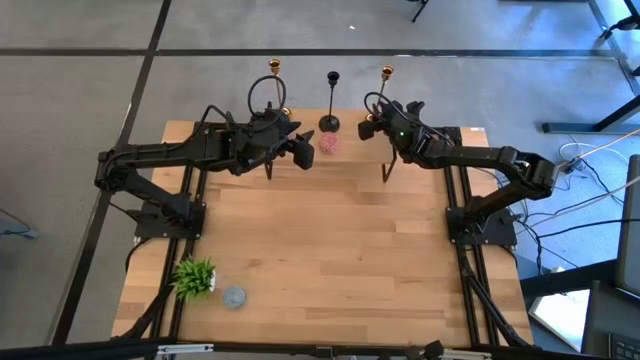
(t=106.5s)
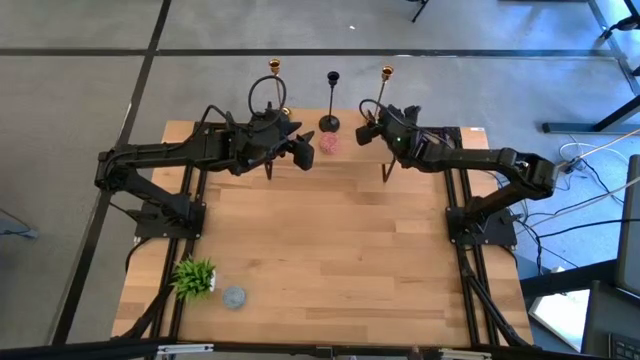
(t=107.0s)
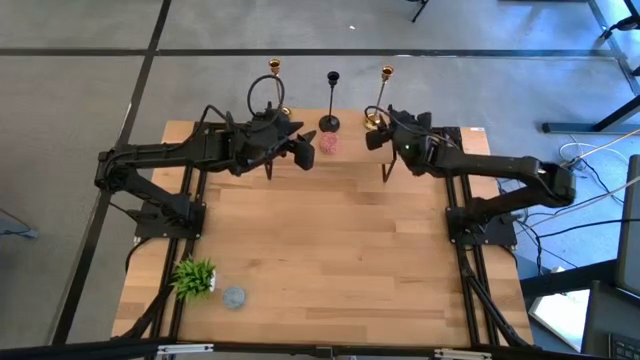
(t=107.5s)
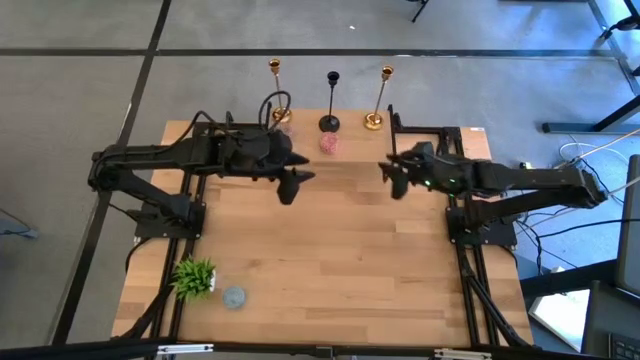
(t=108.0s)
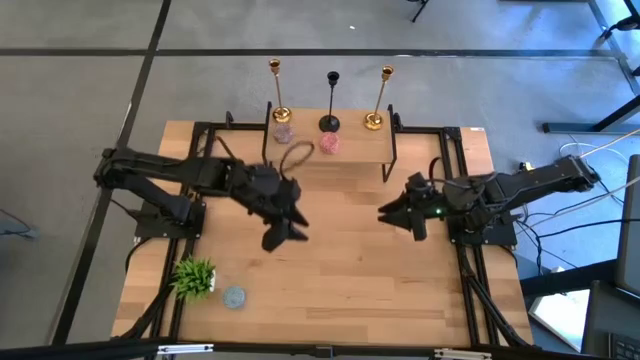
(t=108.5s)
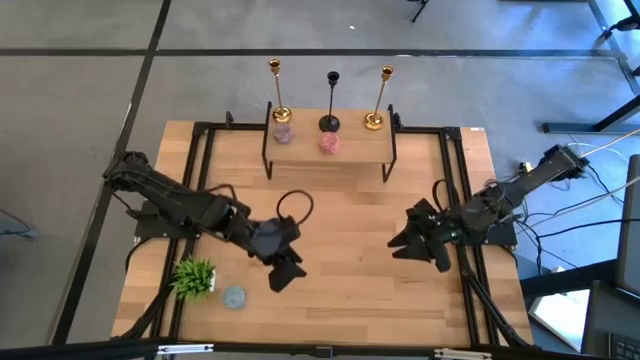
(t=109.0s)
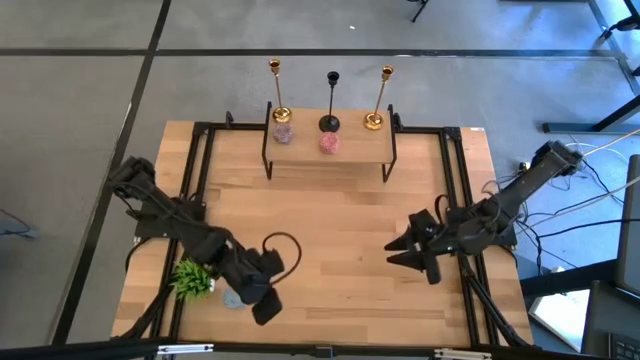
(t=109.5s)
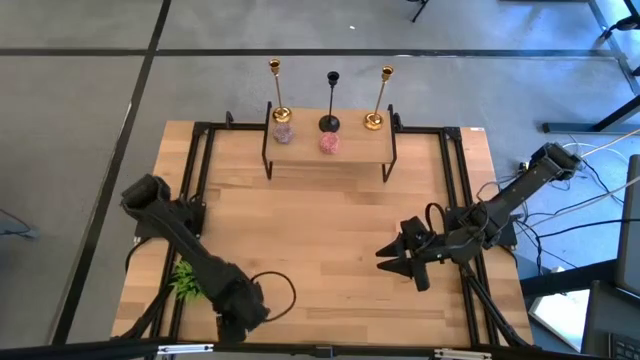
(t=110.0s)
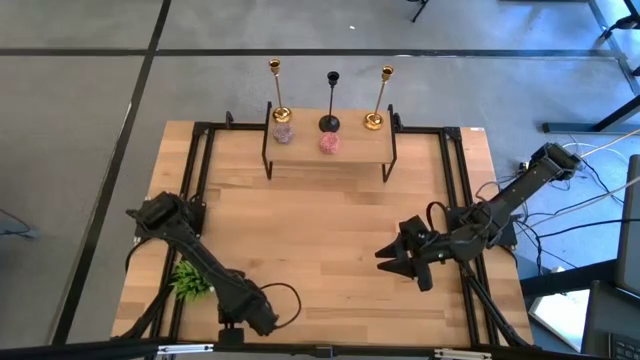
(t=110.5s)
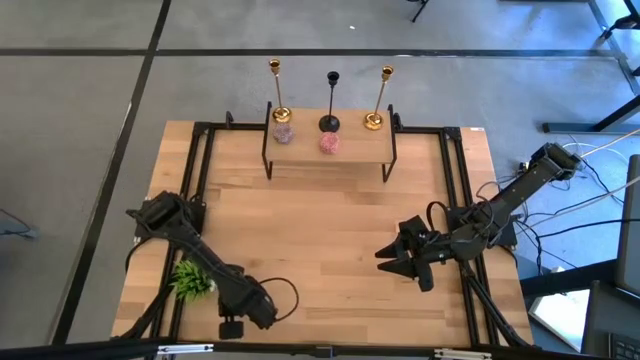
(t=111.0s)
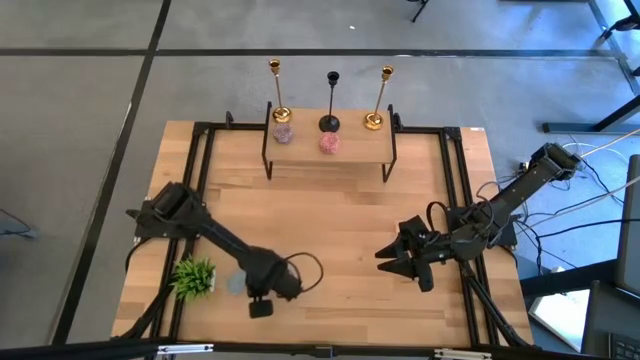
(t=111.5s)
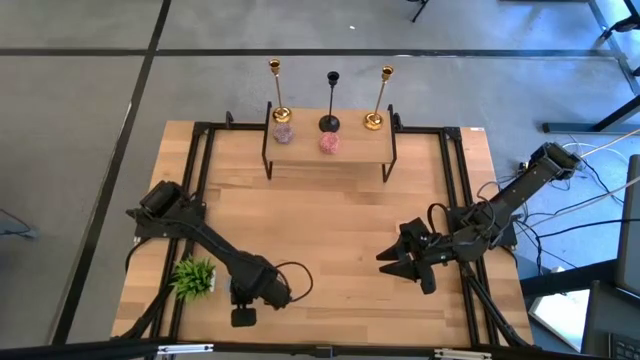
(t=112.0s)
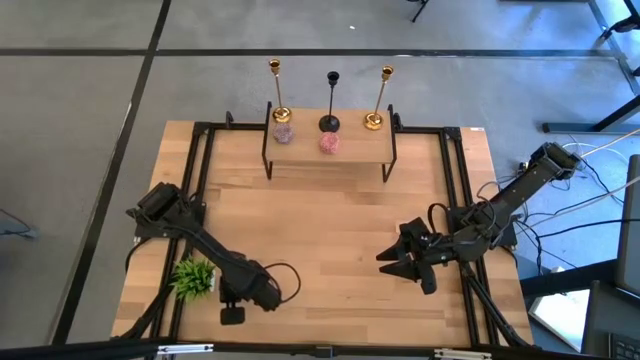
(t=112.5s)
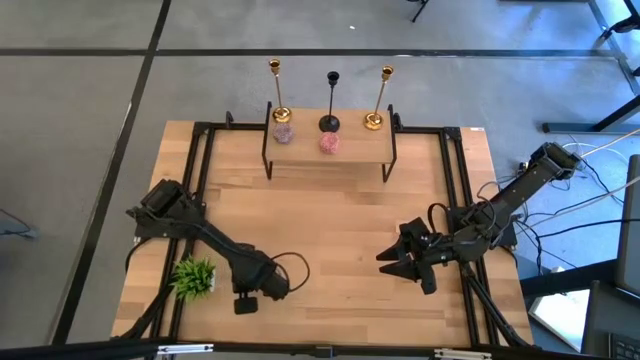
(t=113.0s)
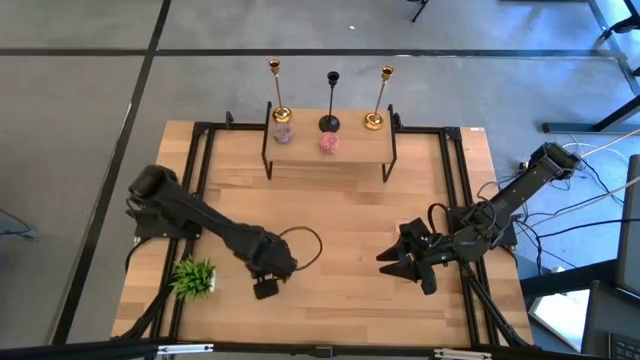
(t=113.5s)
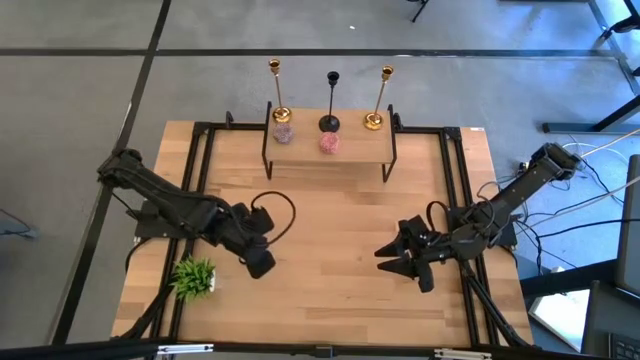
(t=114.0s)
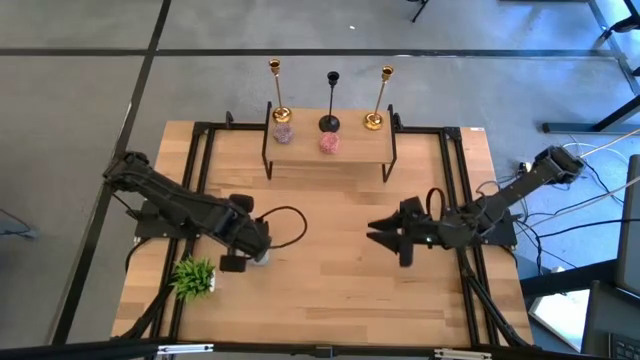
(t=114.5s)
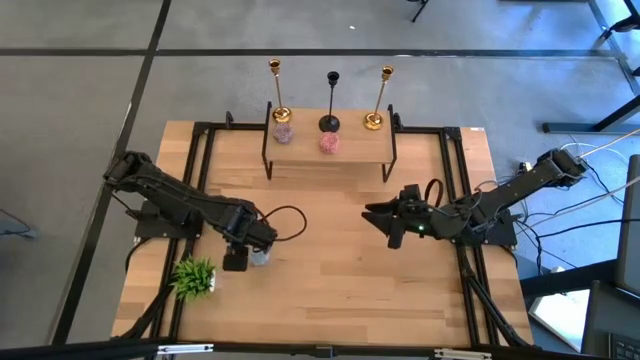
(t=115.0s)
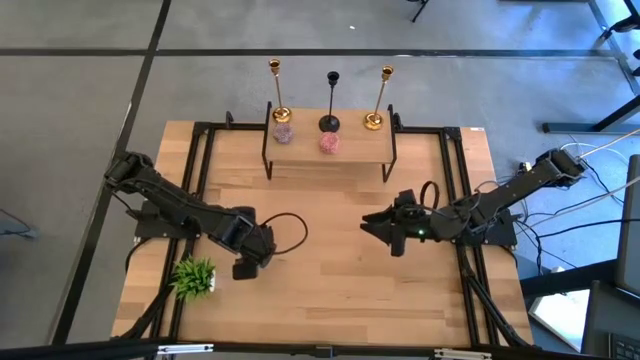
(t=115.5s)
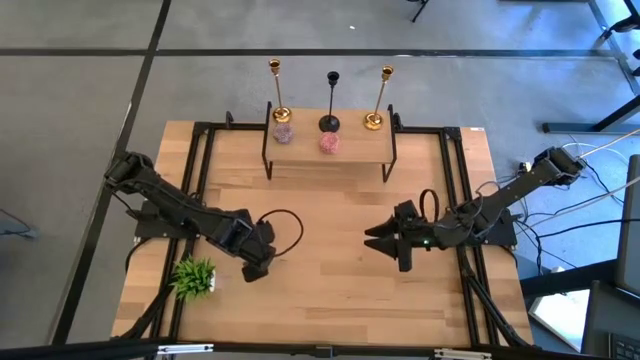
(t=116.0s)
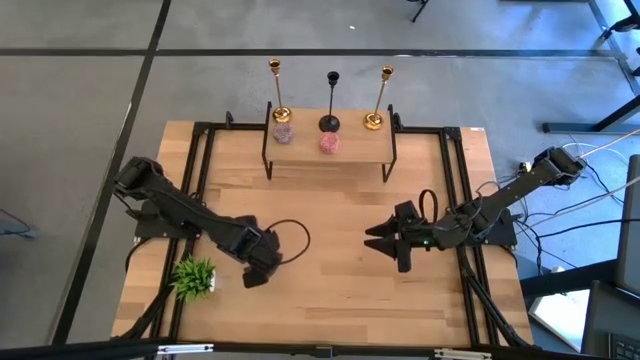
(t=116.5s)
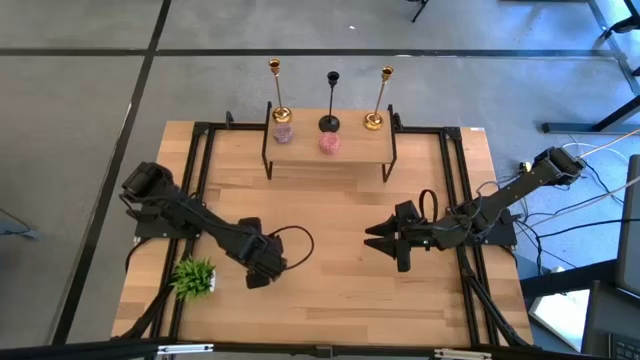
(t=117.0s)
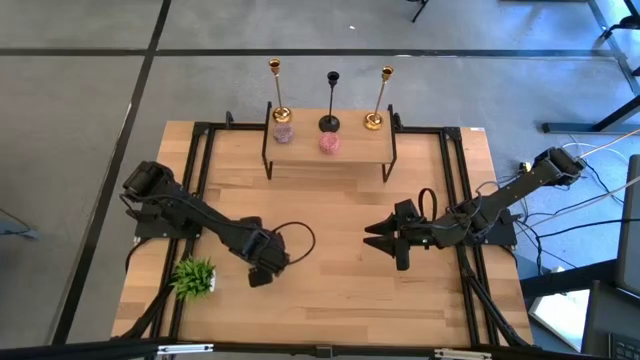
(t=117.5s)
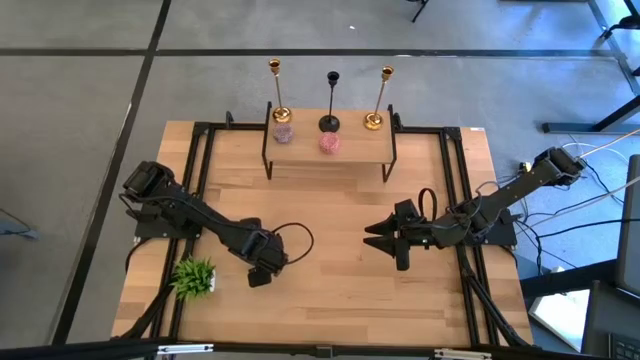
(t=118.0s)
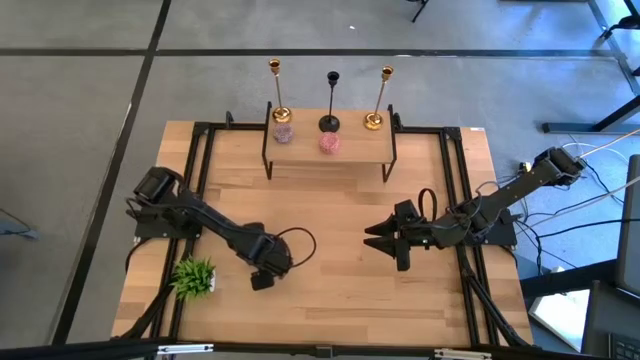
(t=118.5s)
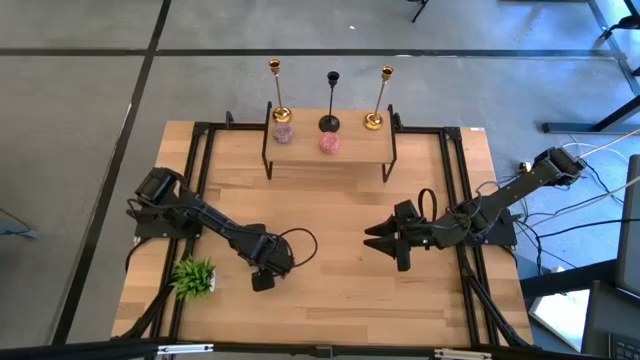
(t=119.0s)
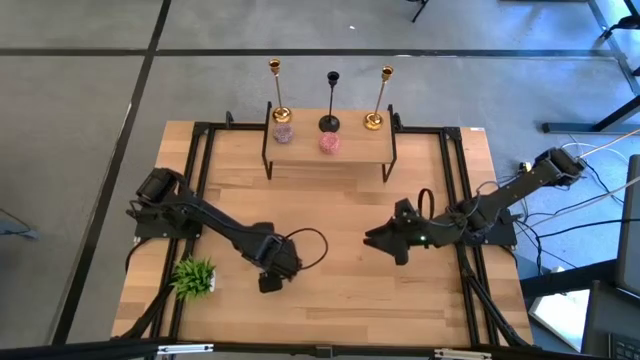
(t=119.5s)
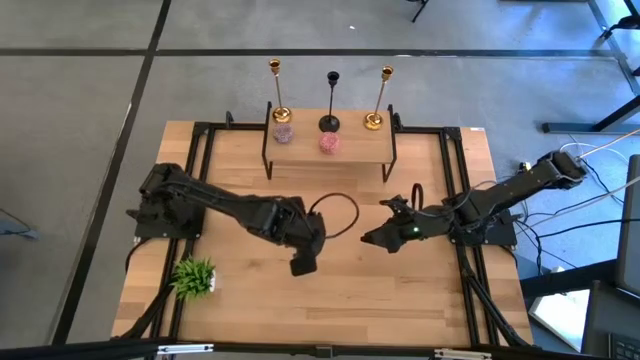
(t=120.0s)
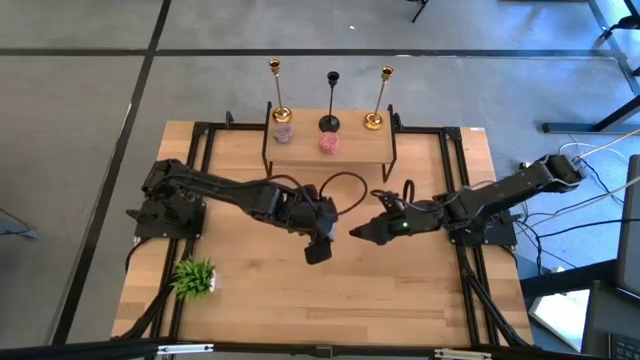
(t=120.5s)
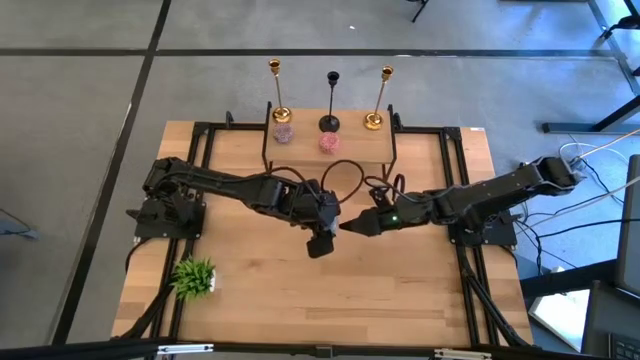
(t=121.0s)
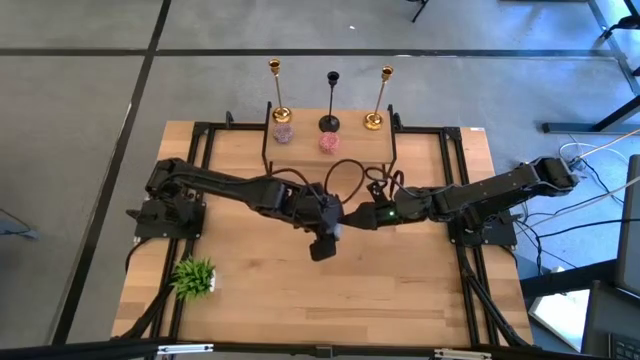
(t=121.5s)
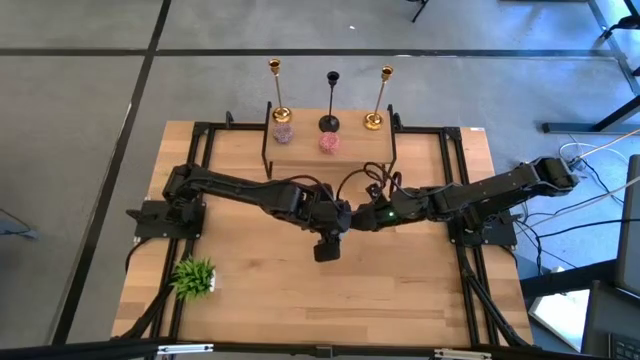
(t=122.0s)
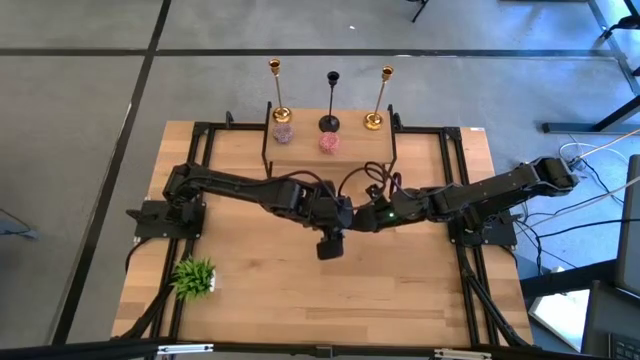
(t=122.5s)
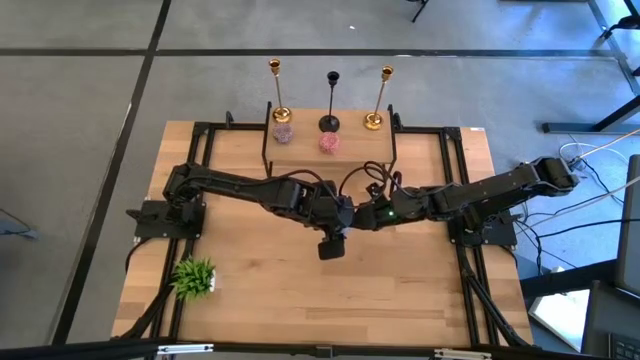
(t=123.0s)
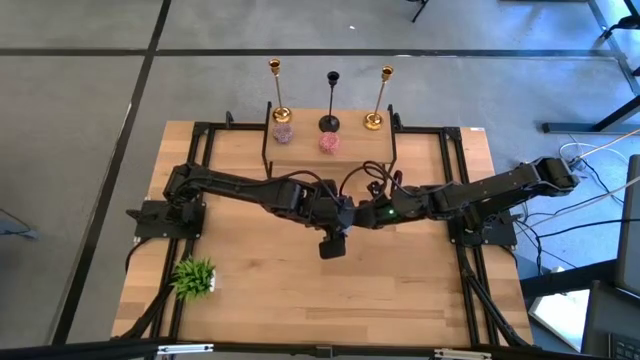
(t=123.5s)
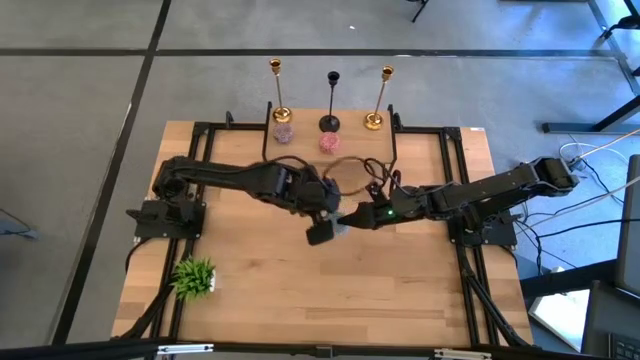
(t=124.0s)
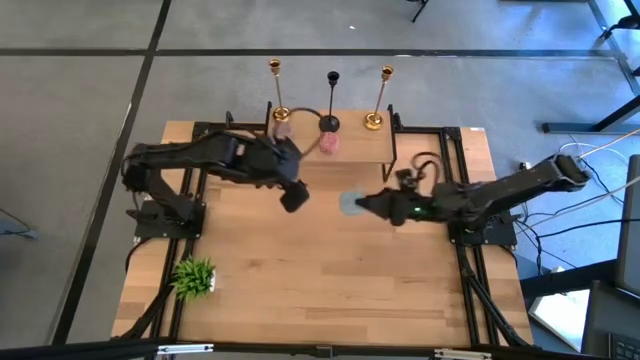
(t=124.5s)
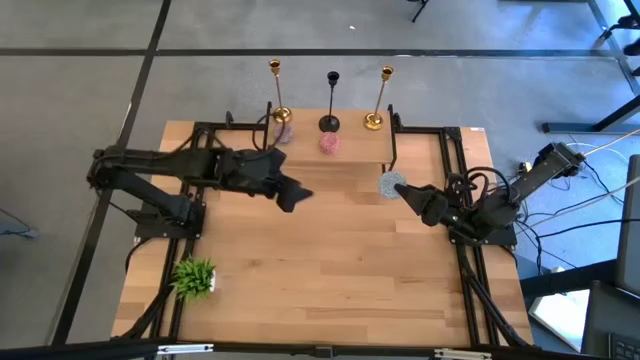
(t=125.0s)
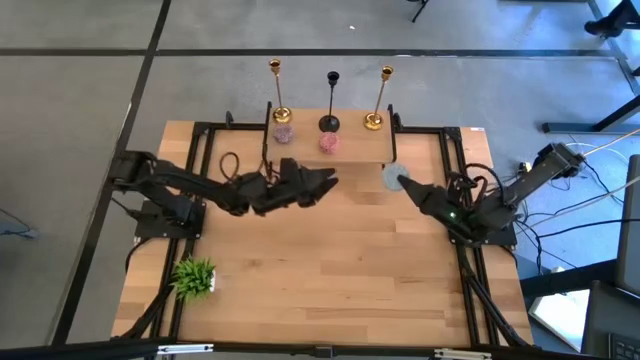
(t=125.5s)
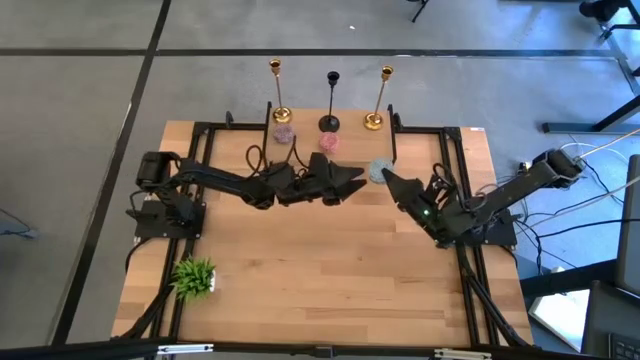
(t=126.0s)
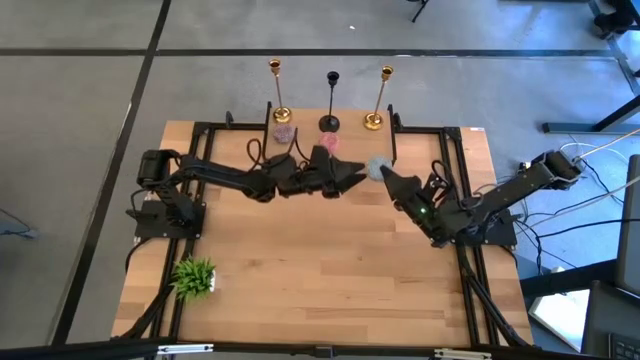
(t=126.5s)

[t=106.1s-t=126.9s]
Task: Pick & Place candle stick holders
Put the blue scented candle on the shelf
